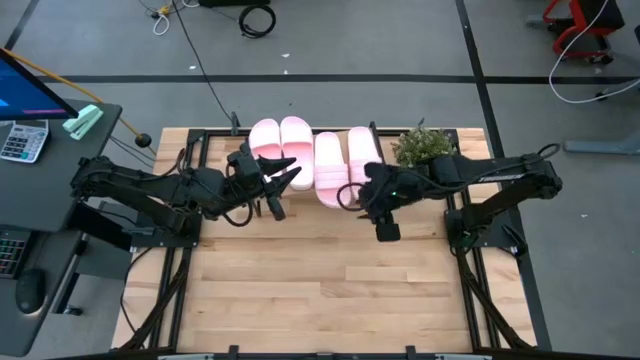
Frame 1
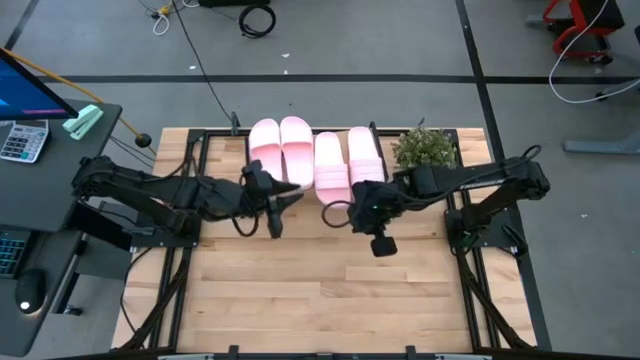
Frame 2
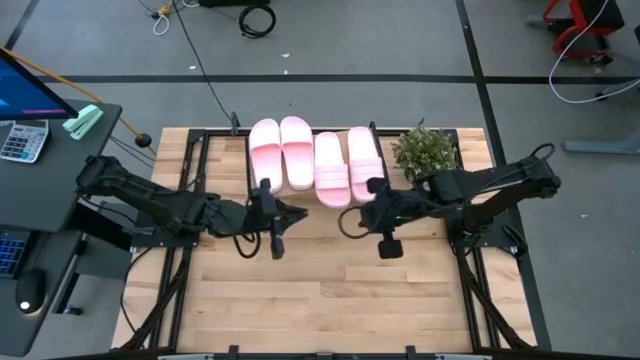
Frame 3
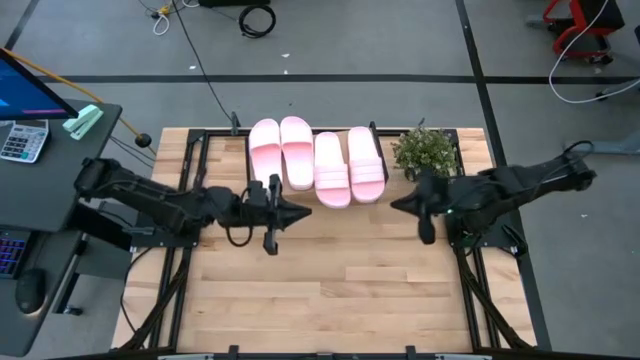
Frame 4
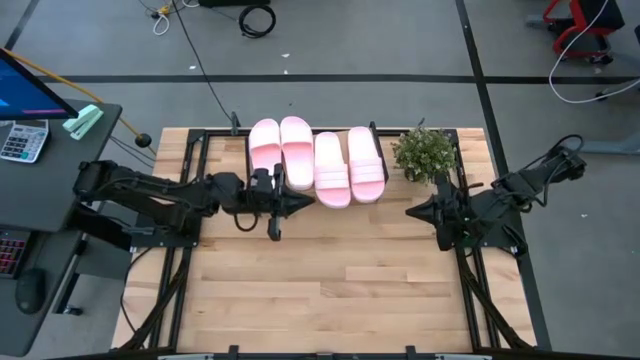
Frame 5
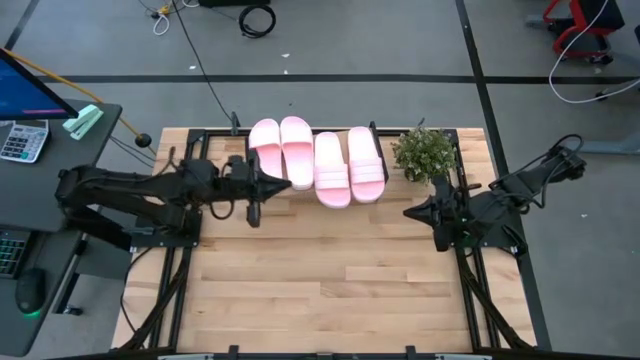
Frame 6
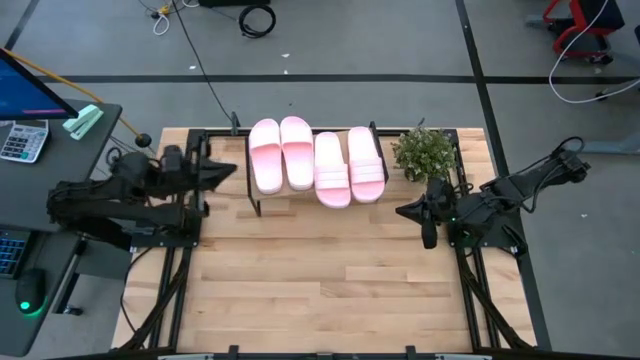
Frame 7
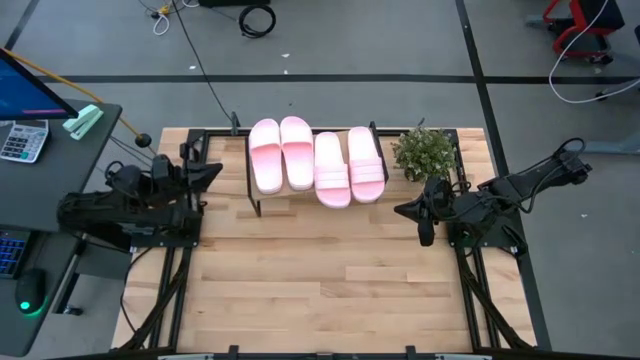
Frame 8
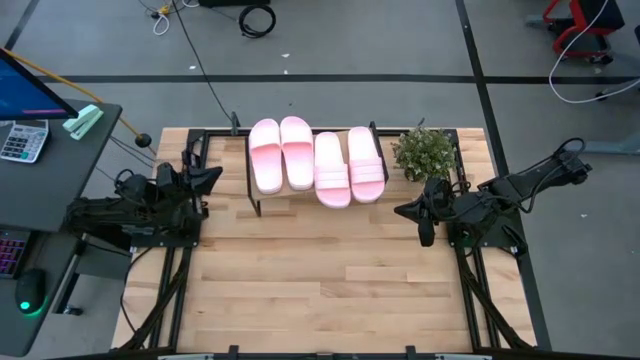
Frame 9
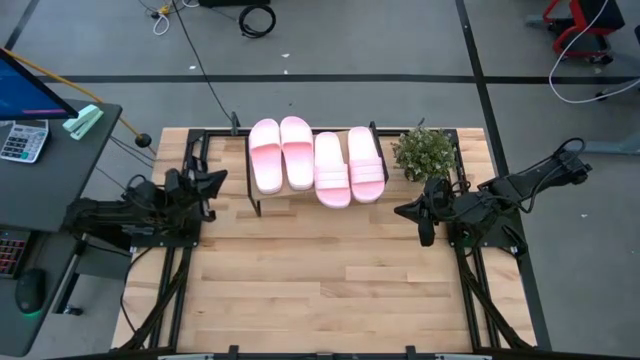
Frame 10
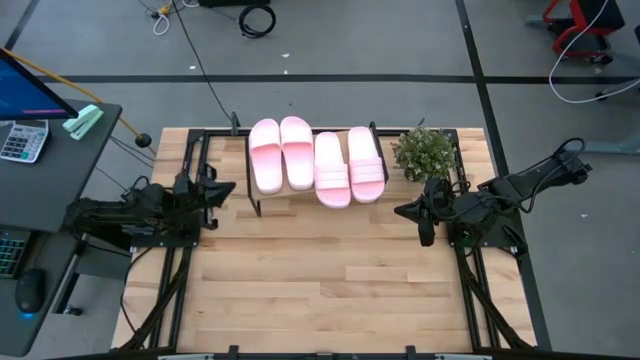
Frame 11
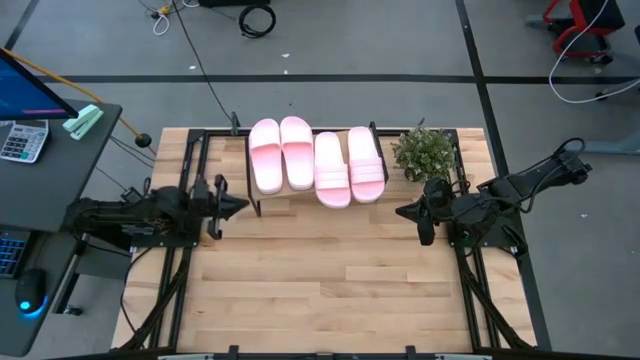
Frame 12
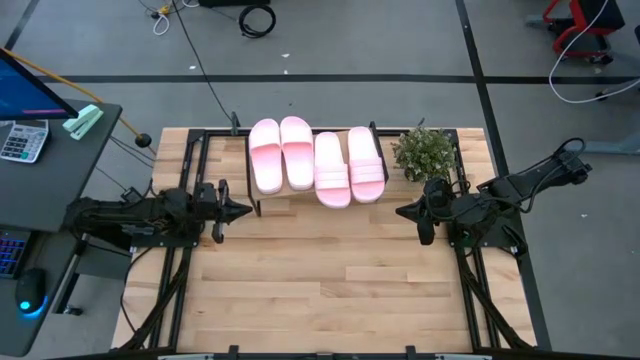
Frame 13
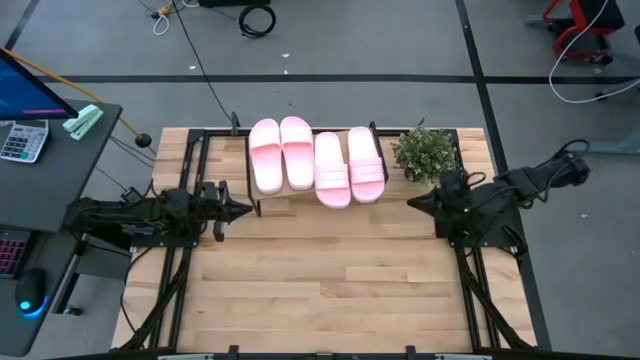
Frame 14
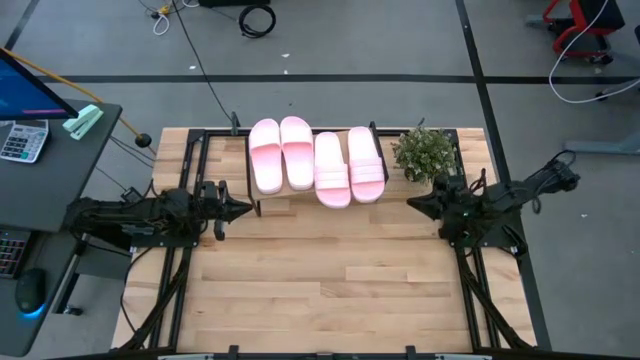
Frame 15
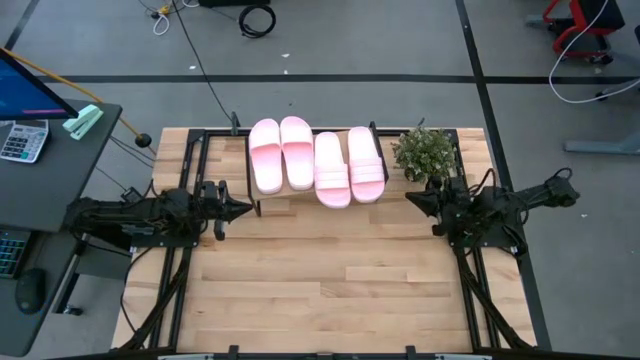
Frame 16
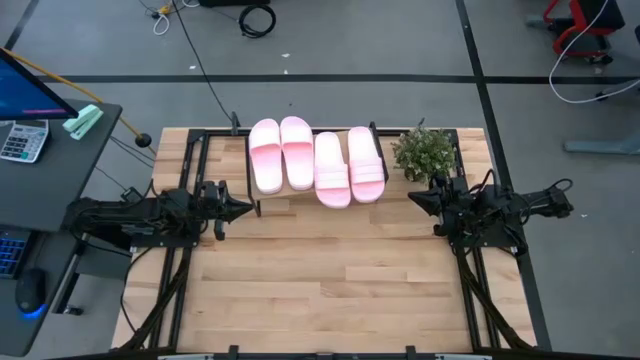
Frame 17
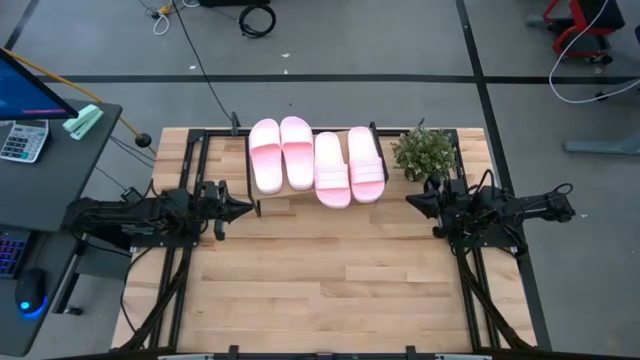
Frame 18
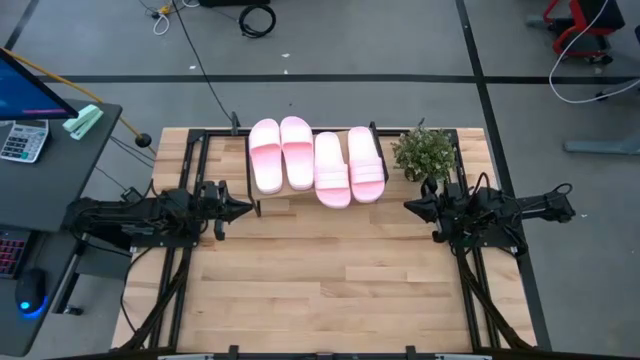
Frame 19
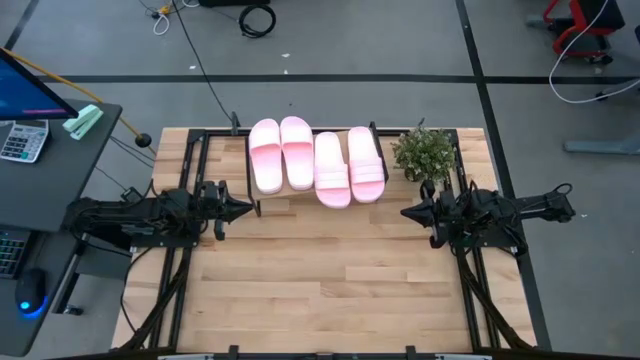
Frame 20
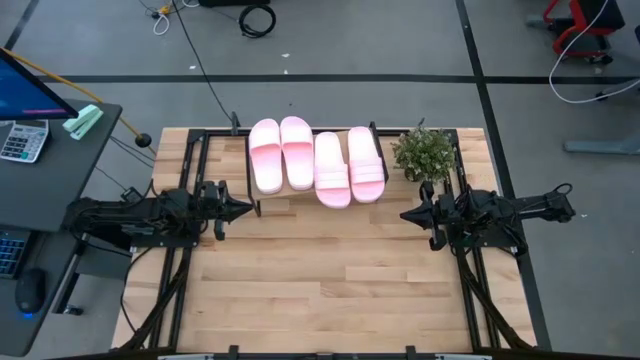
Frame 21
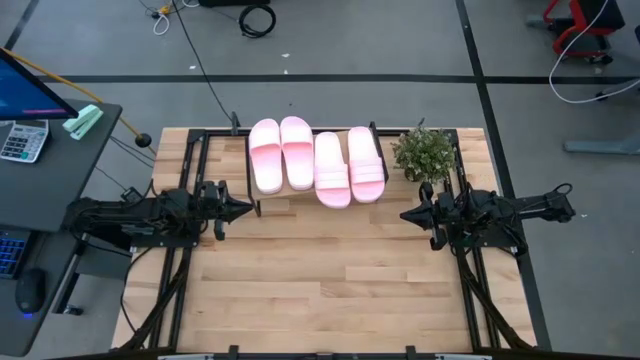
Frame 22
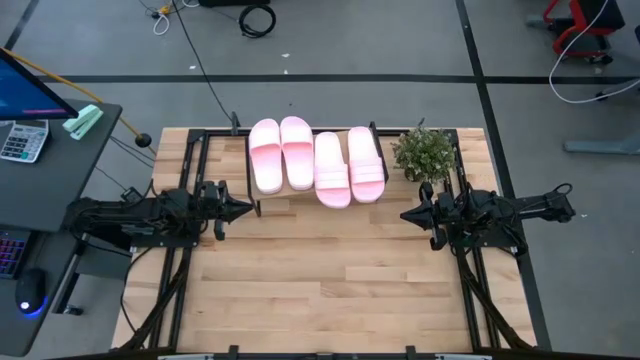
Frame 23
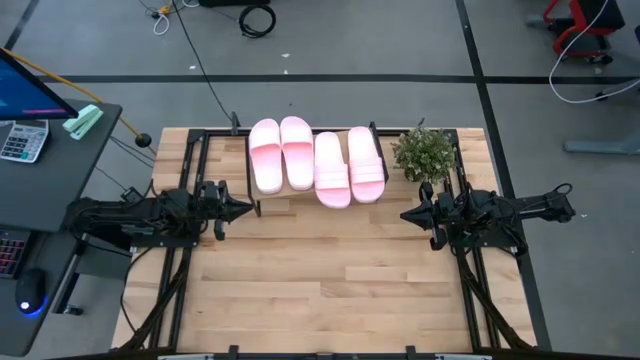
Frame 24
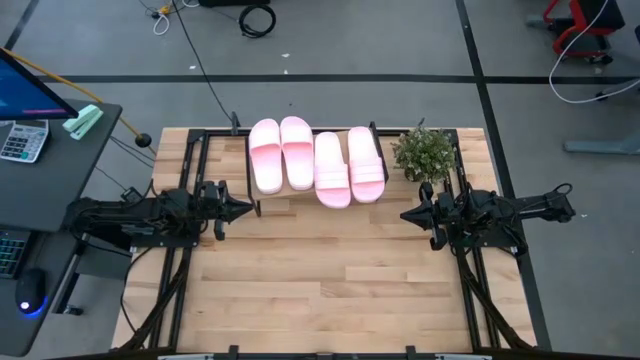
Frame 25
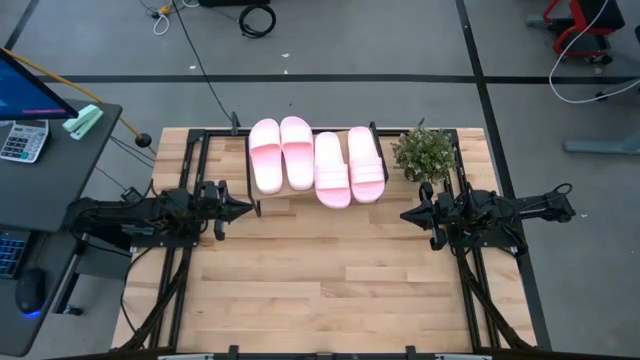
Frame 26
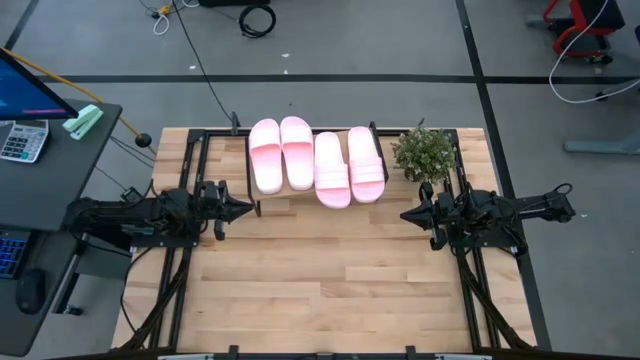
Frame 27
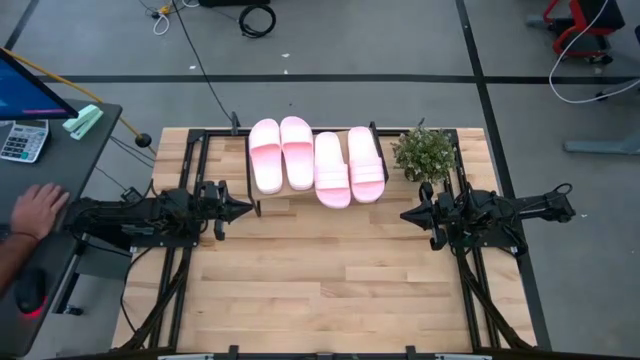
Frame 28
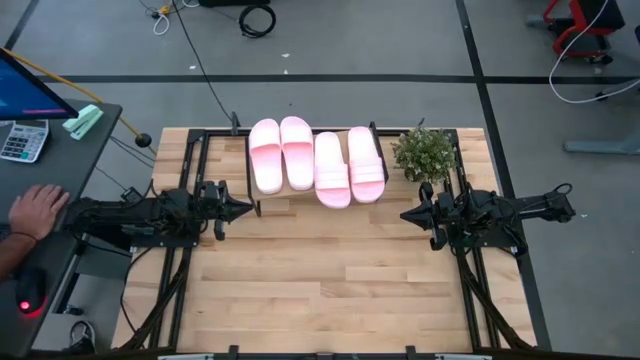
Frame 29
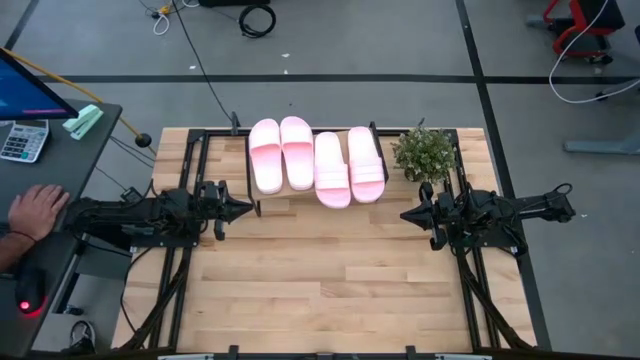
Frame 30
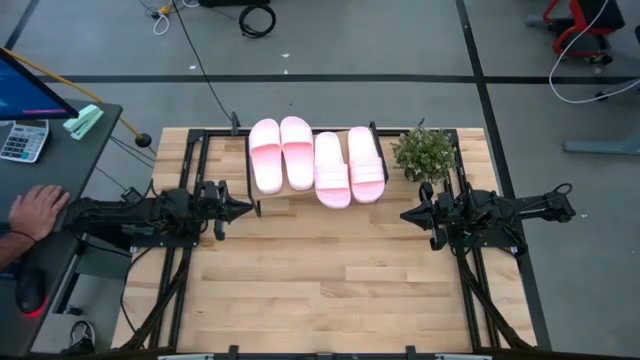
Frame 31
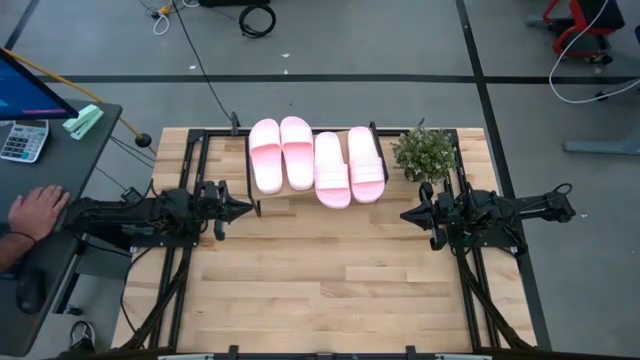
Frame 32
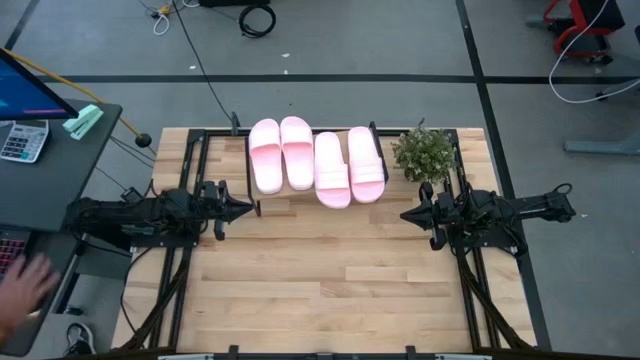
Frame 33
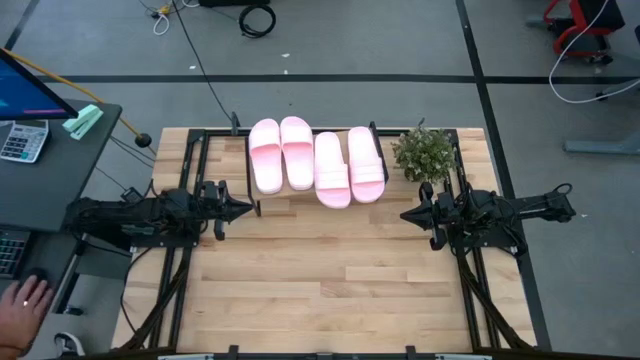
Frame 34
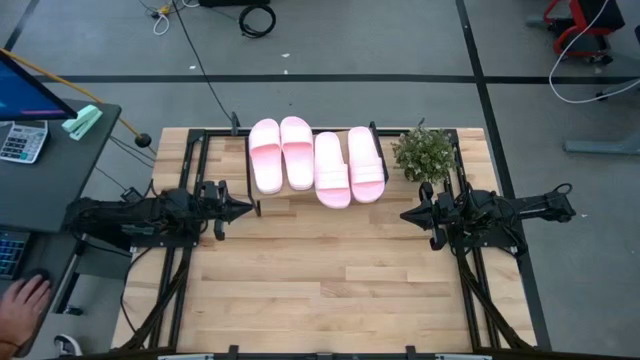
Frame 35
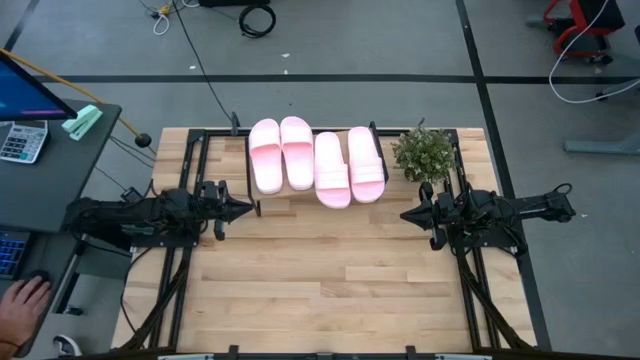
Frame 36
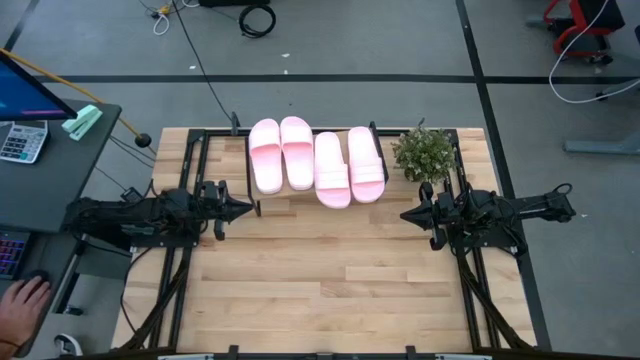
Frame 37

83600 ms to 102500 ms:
Task: Pick and place slides into the shelf
Return to Home Position

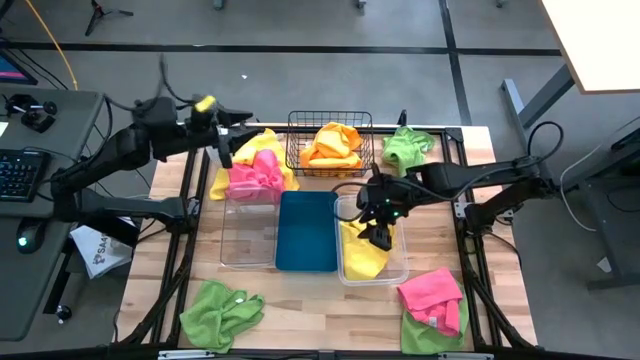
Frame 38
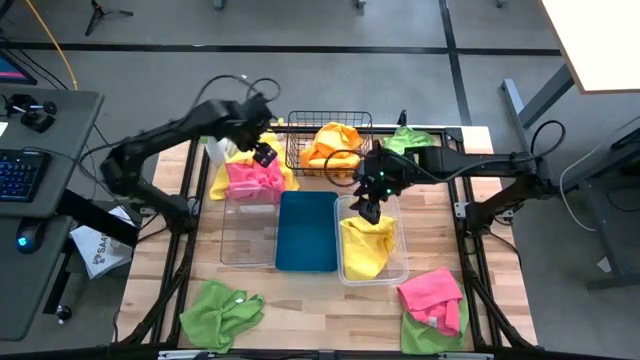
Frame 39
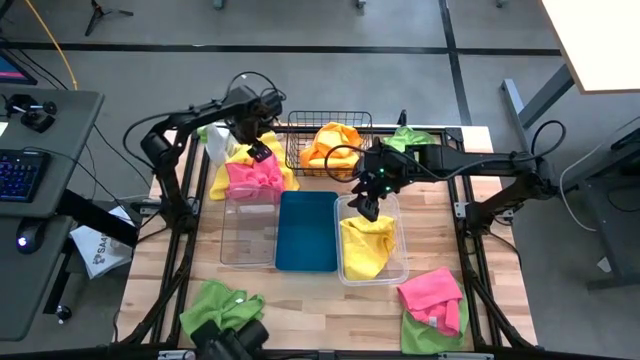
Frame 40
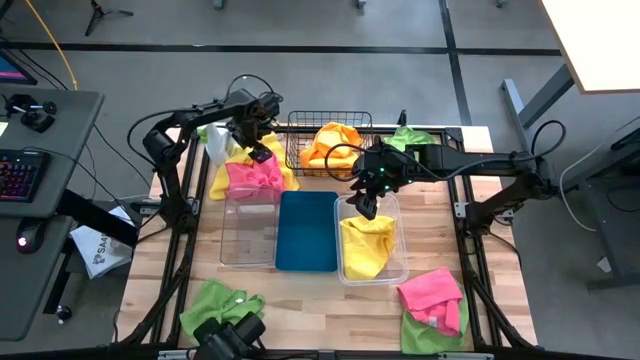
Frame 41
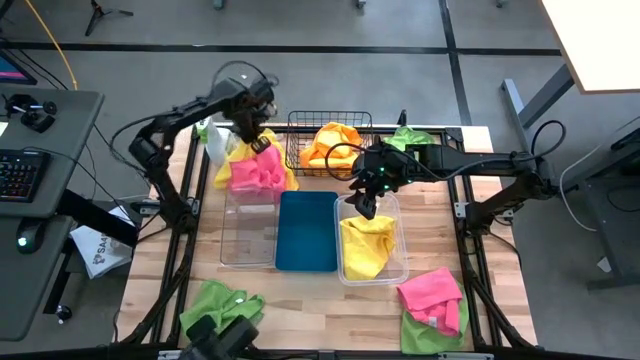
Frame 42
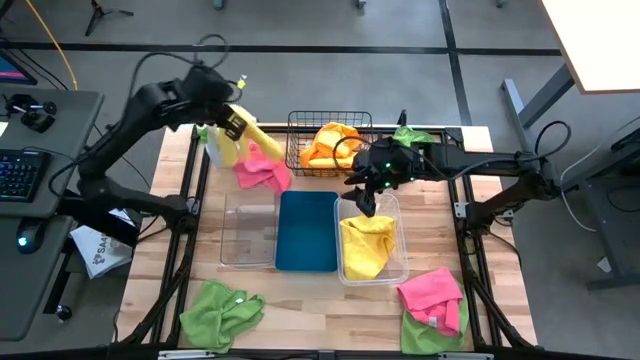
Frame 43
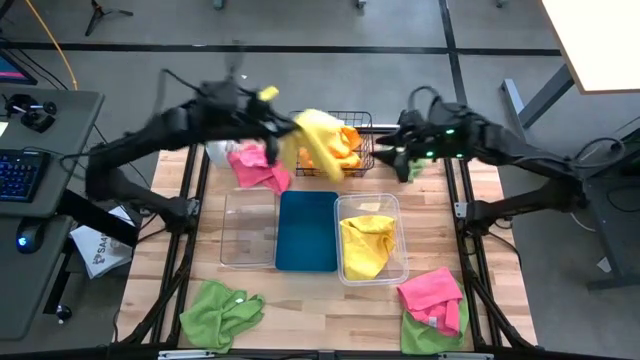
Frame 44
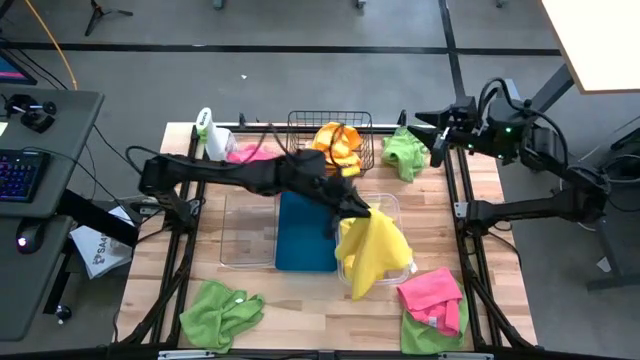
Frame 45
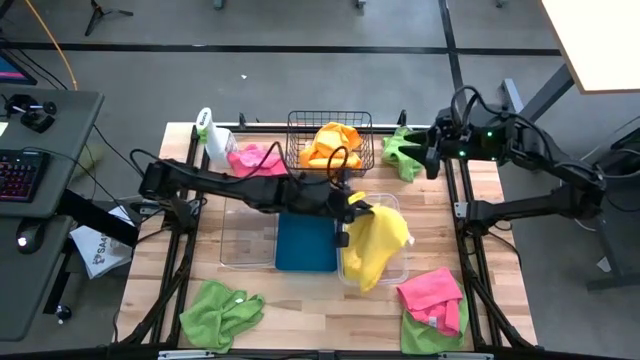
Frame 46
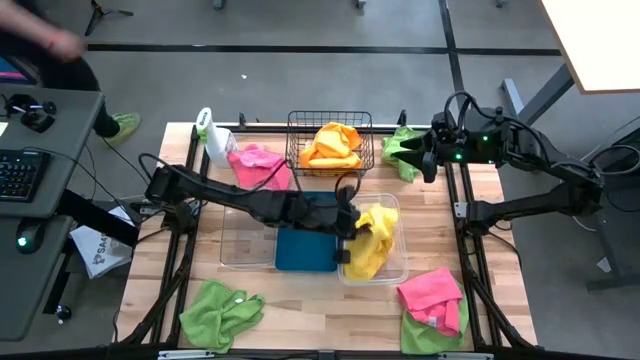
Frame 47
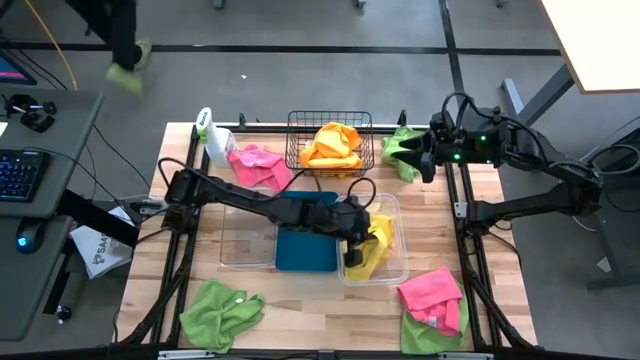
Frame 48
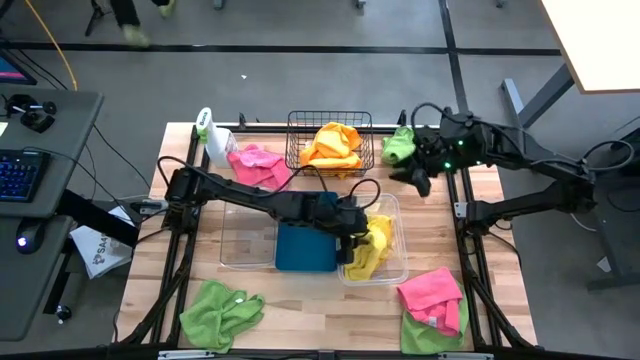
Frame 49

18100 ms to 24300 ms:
Task: Sort microfiber towel by color & place in baskets
Put the yellow microfiber cloth into the right transparent bin
